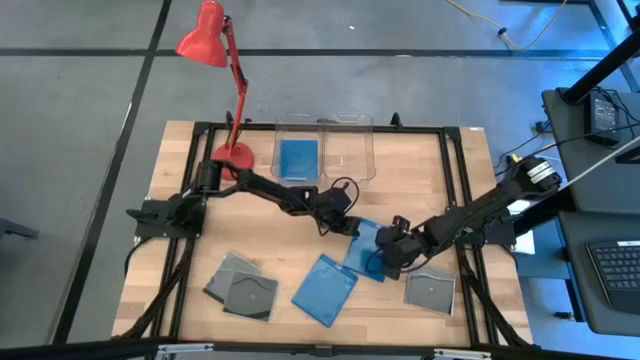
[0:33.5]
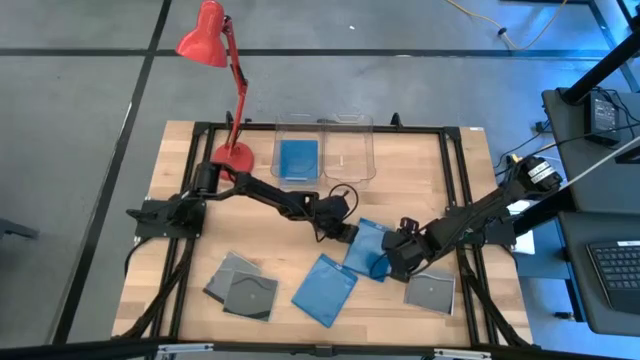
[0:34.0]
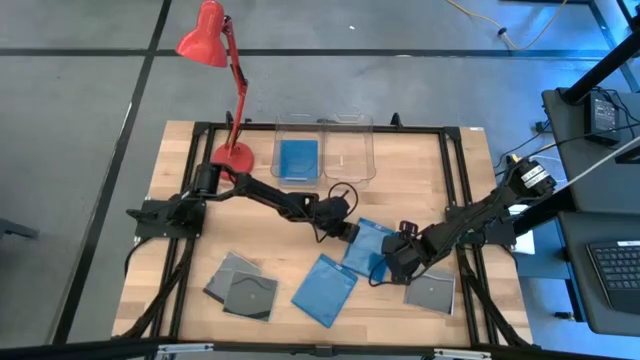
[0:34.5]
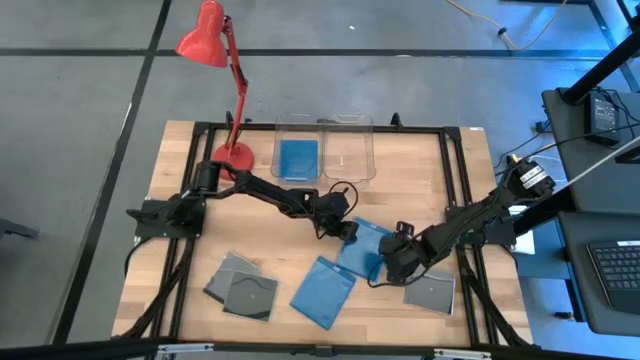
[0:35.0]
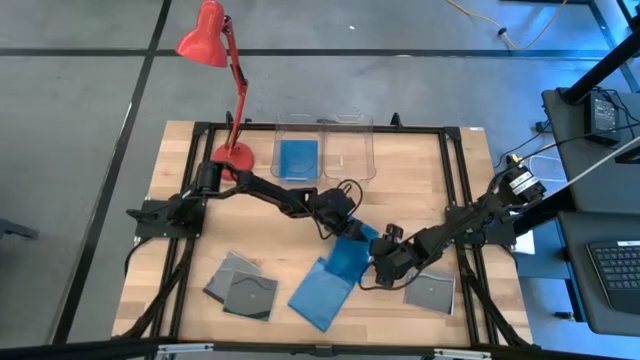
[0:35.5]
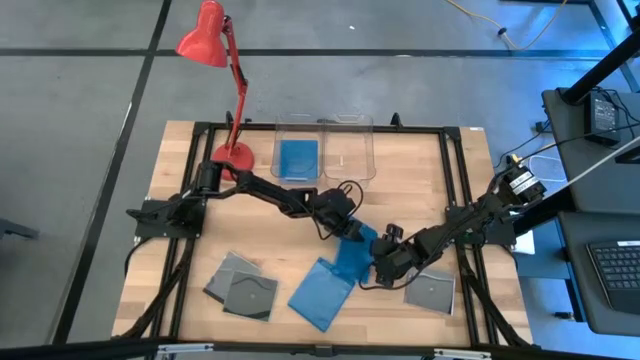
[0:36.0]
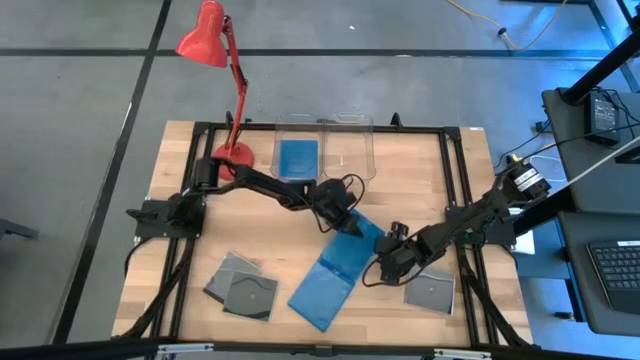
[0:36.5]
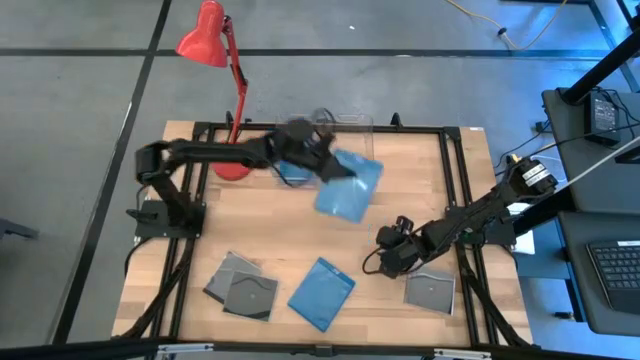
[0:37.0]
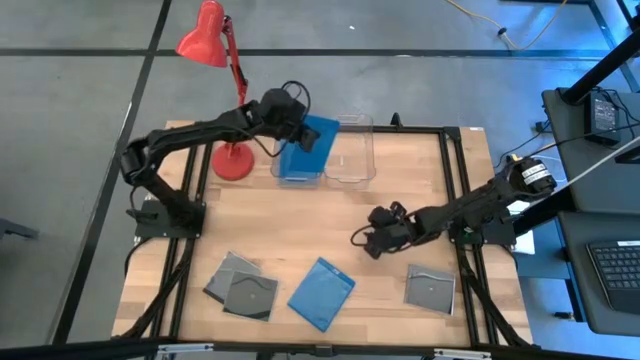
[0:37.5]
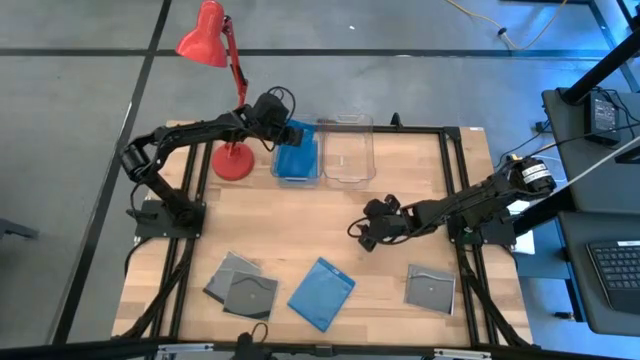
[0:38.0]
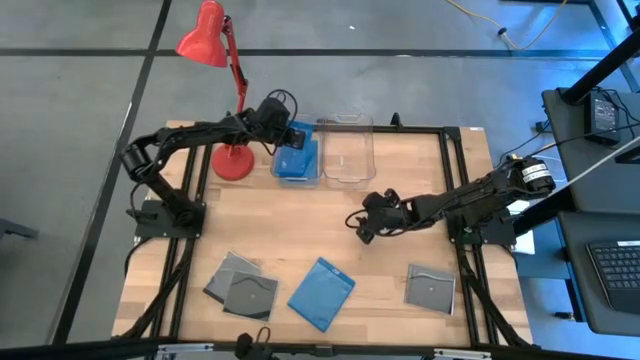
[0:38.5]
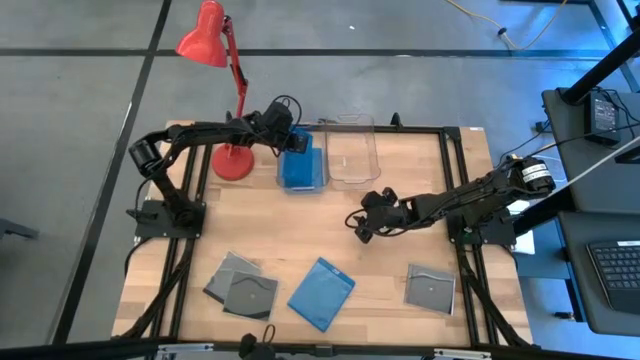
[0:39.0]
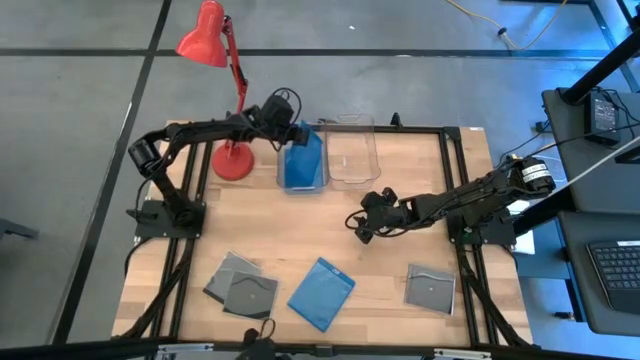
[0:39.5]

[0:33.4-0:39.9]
Task: Pick & place jewel cases by type
Put the right blue CD case into the left transparent bin

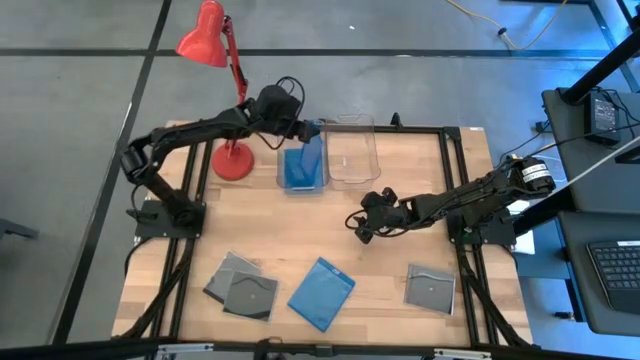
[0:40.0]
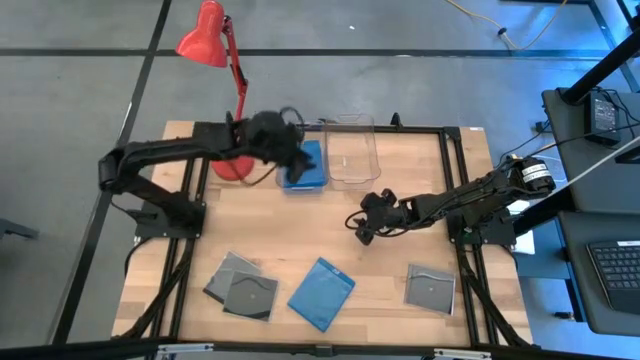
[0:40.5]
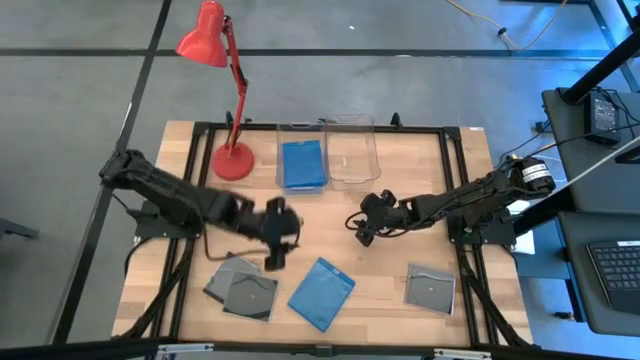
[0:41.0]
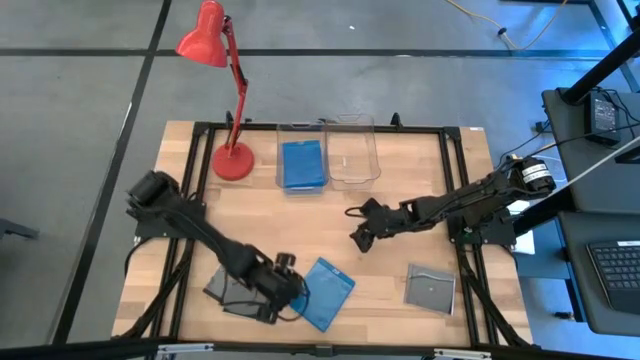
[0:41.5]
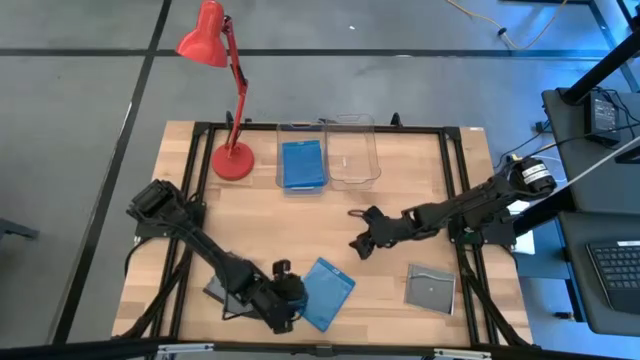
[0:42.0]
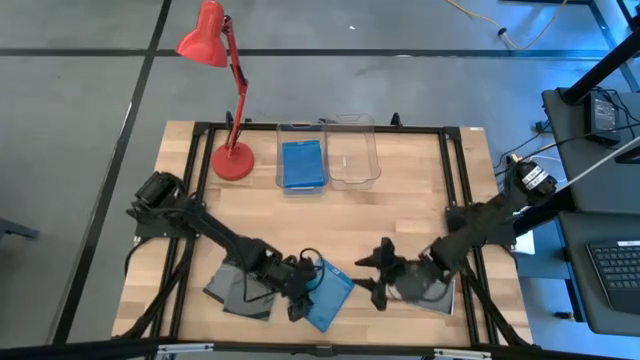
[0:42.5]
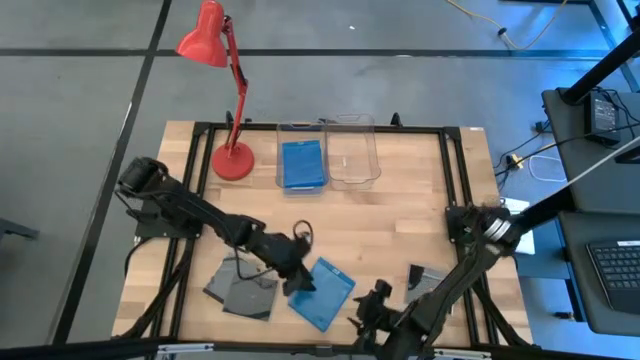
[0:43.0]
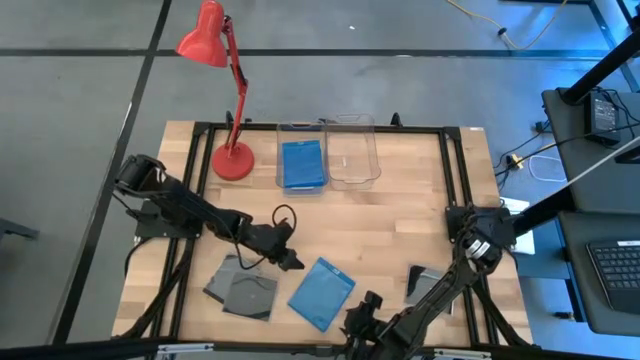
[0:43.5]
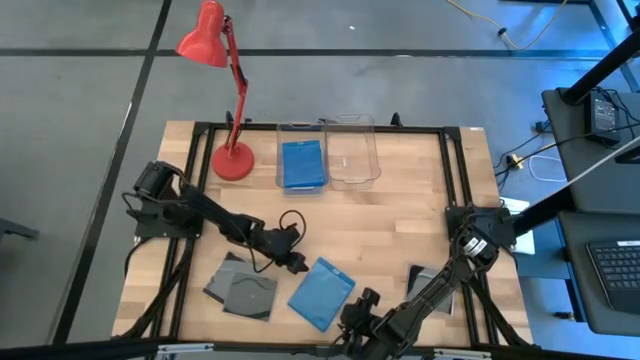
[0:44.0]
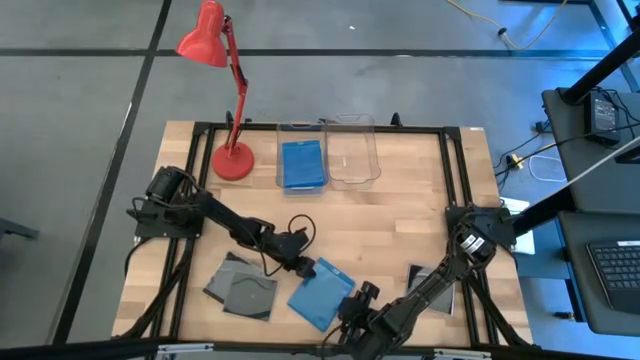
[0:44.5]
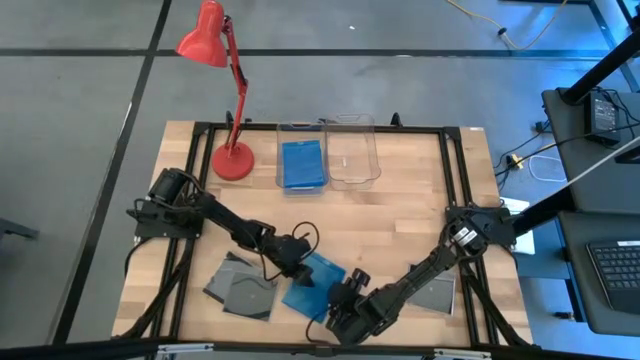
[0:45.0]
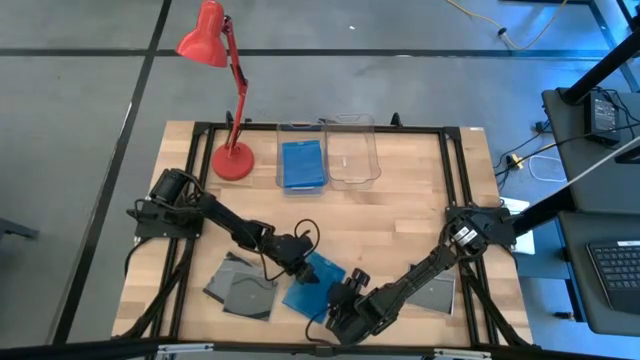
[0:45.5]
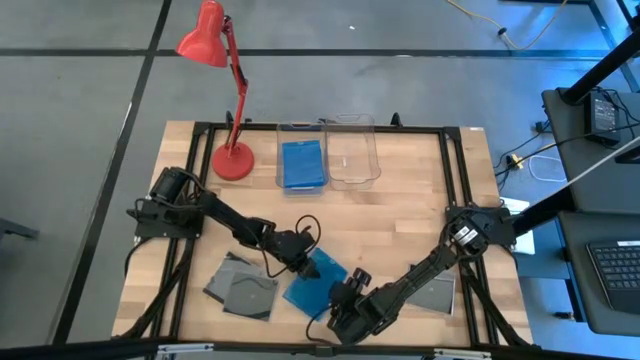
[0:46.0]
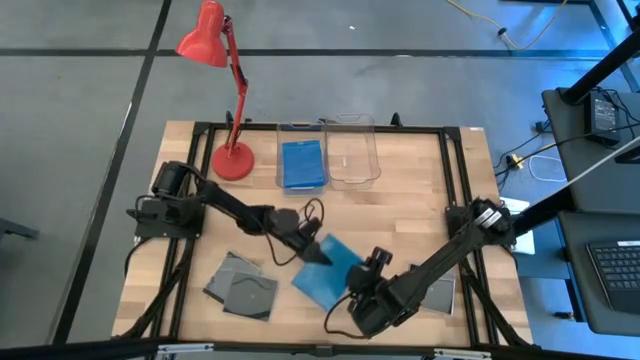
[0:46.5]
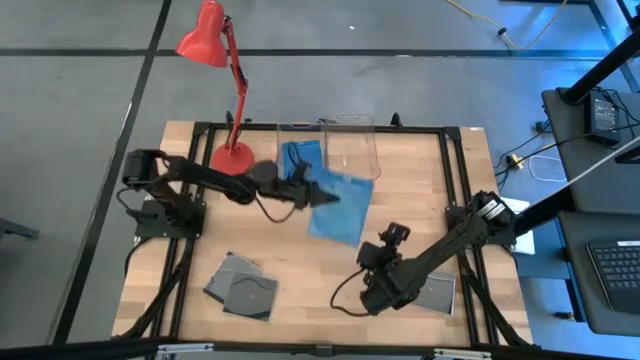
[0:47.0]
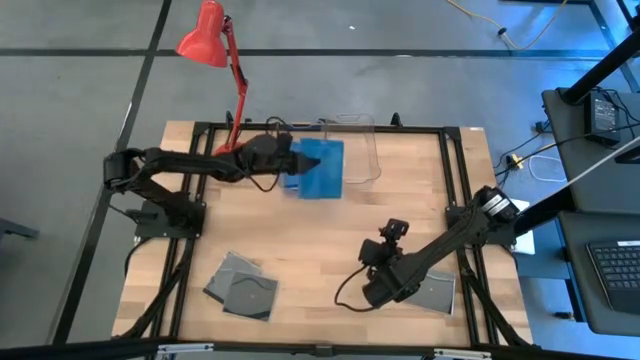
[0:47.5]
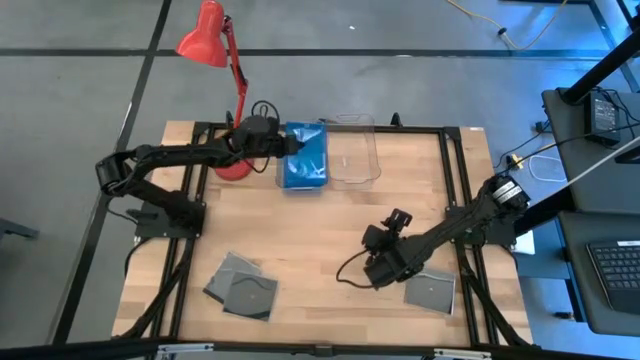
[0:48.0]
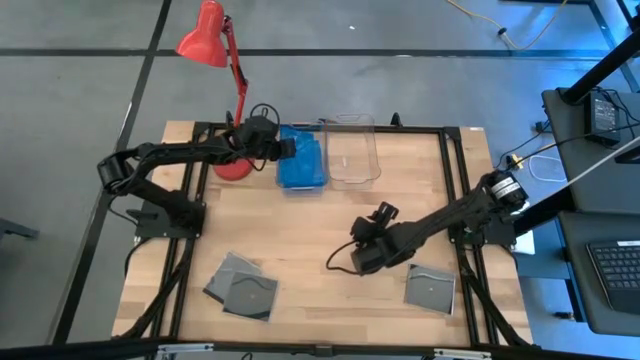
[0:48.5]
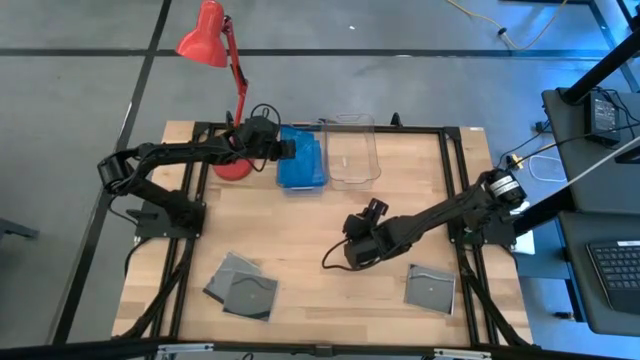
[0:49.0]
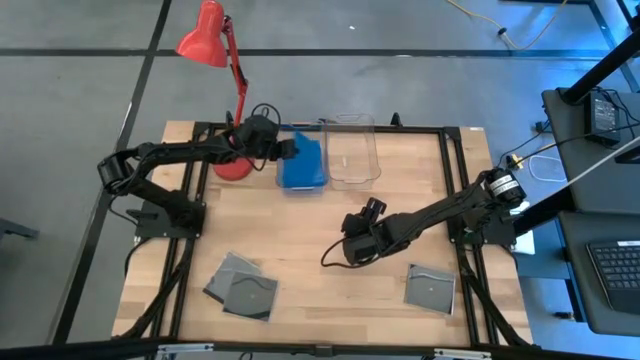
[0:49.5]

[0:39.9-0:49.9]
Put the blue CD case into the left transparent bin

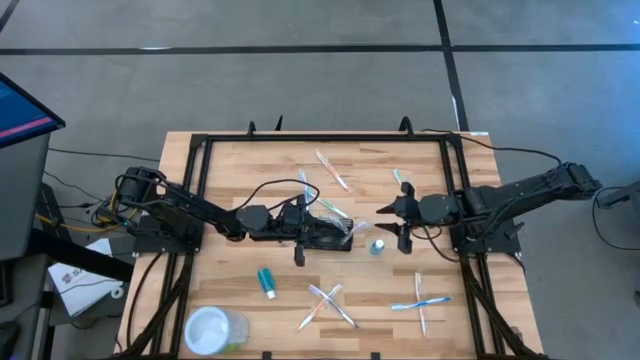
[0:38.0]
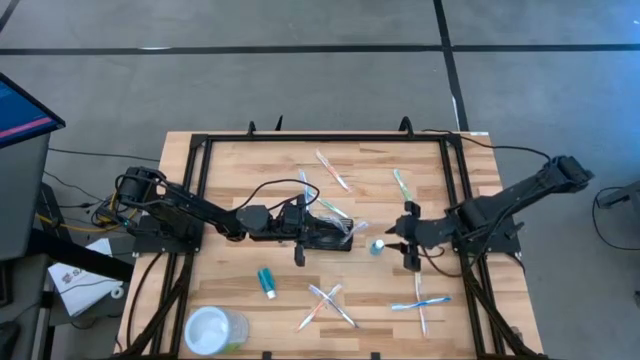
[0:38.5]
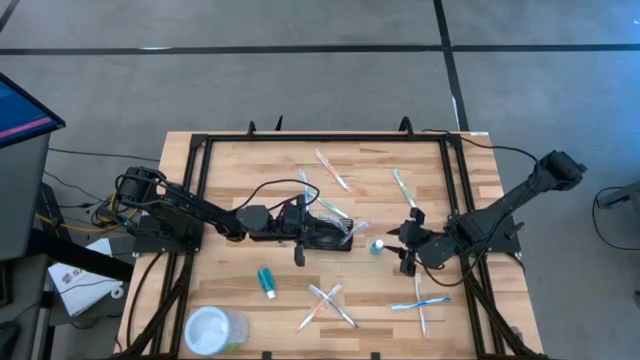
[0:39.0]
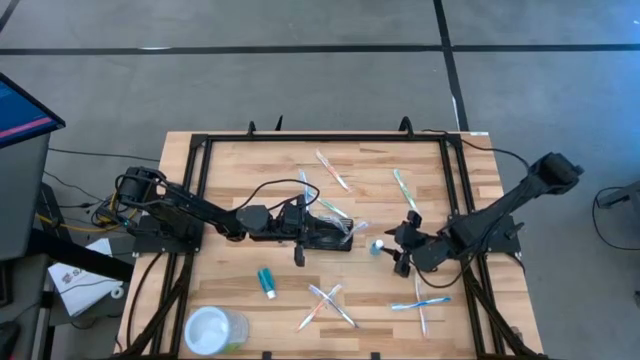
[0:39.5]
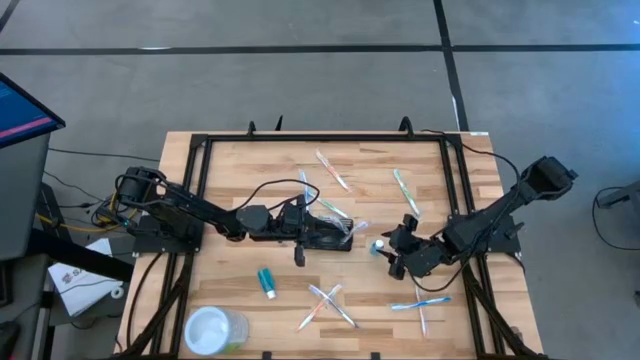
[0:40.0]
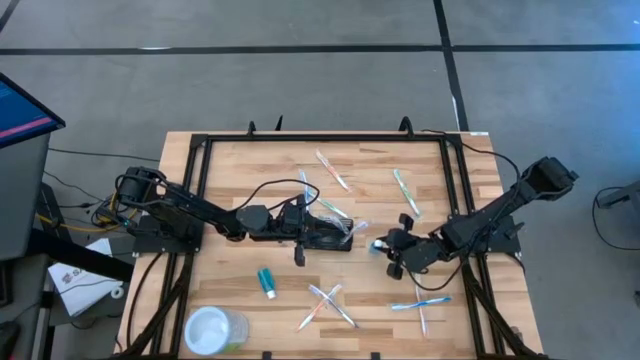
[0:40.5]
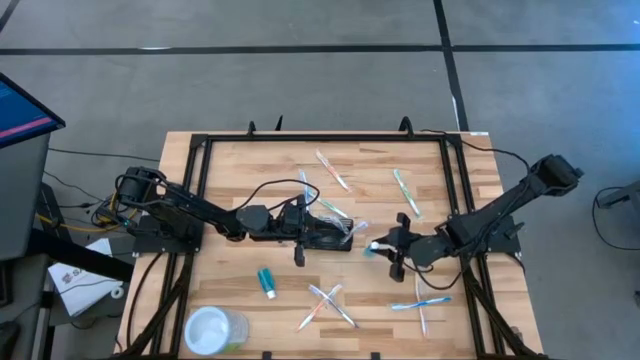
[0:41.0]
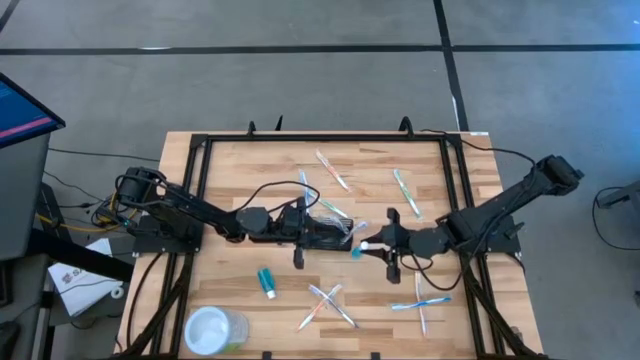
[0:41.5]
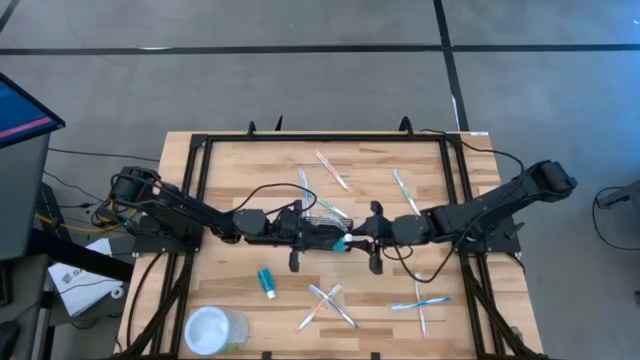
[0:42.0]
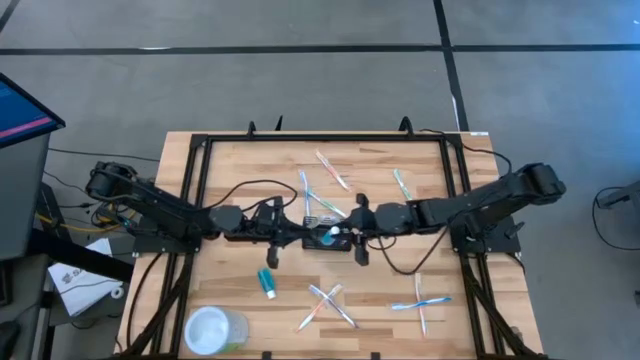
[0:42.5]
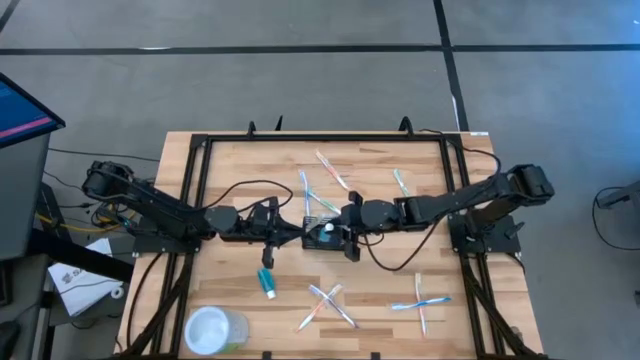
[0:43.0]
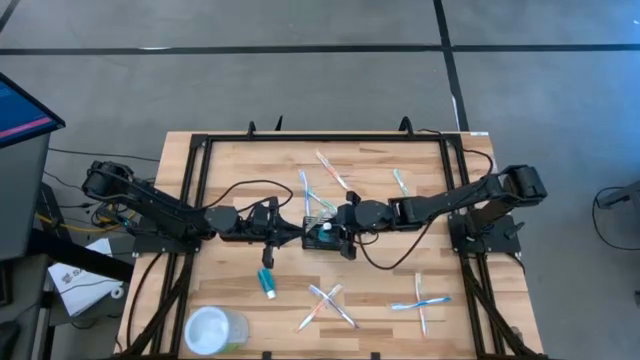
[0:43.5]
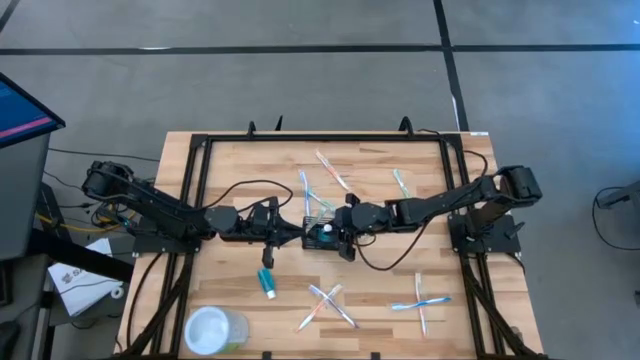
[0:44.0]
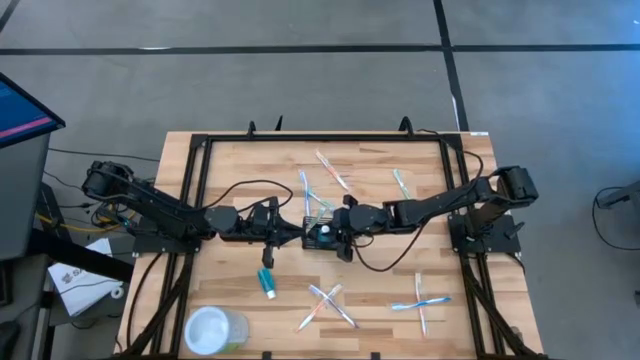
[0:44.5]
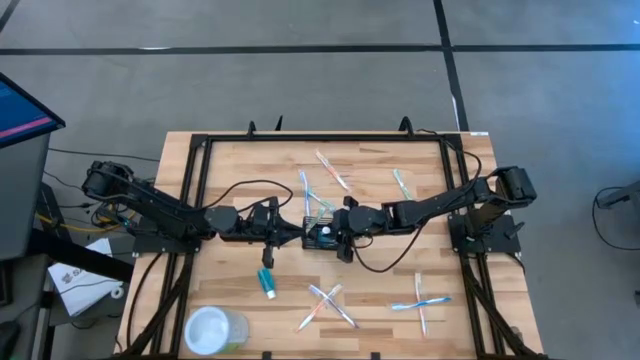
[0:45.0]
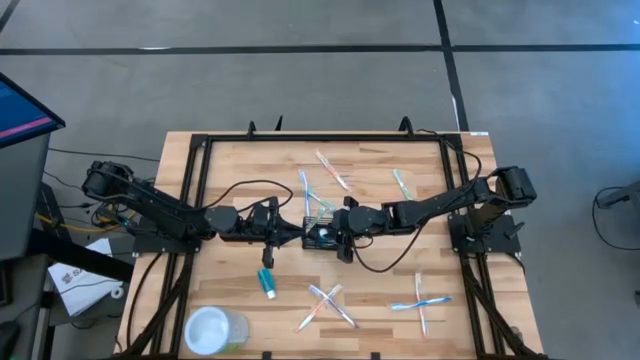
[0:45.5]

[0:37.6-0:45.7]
Task: Pick & Place toothbrushing station
Put the right mouthwash into the wire organizer
